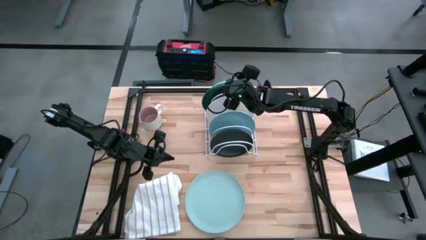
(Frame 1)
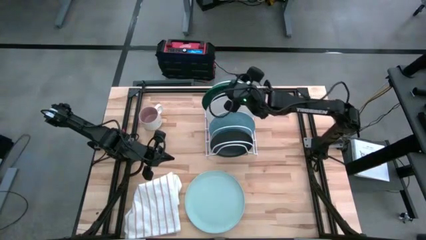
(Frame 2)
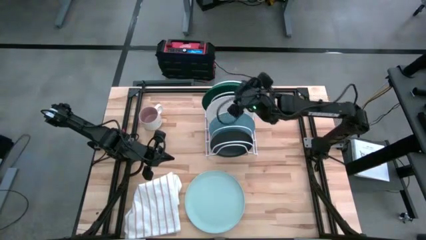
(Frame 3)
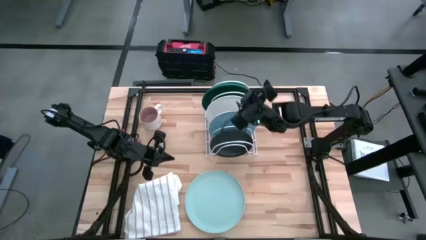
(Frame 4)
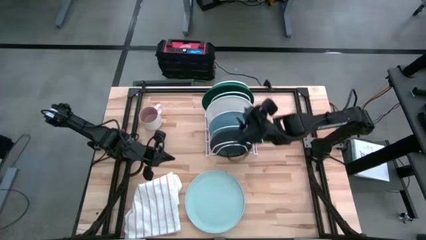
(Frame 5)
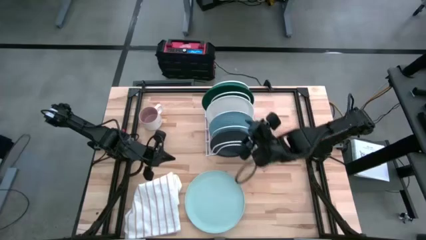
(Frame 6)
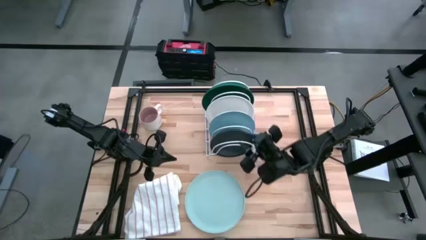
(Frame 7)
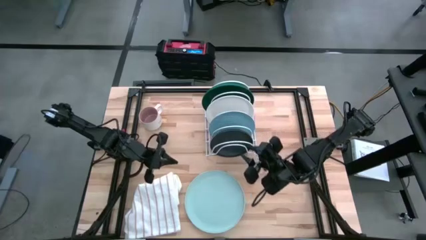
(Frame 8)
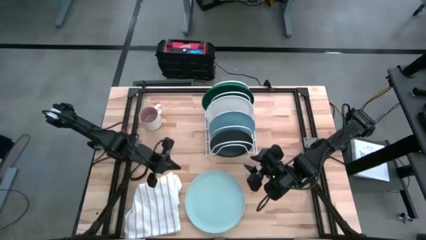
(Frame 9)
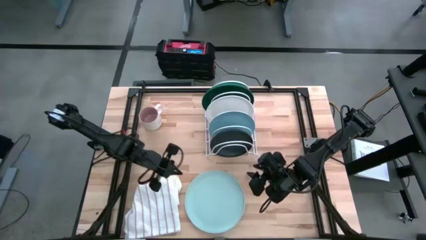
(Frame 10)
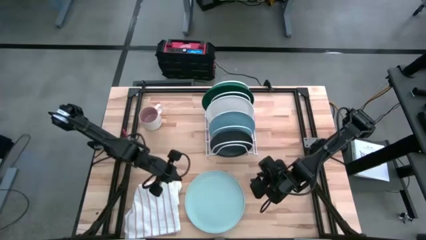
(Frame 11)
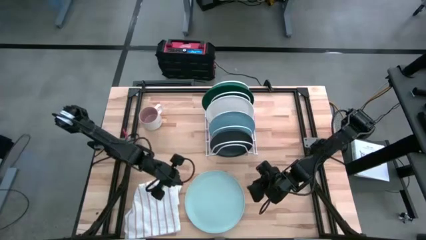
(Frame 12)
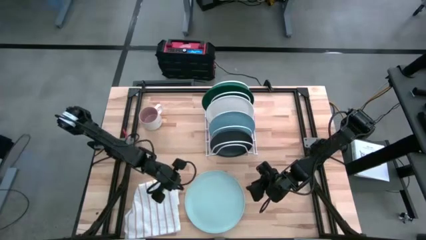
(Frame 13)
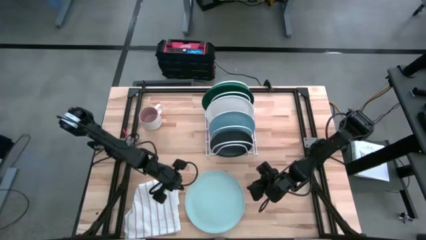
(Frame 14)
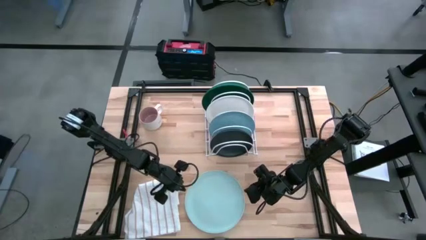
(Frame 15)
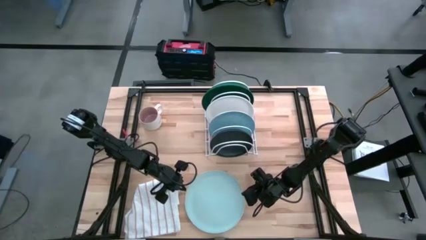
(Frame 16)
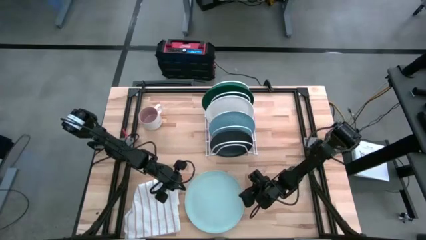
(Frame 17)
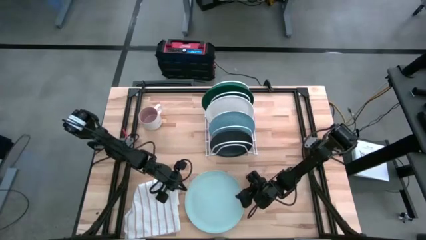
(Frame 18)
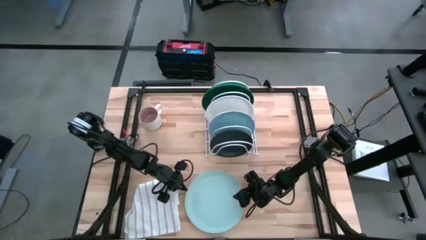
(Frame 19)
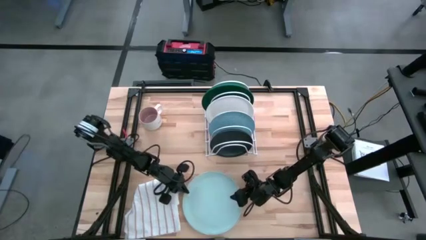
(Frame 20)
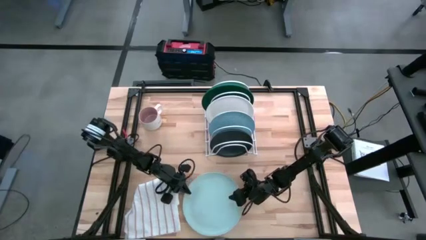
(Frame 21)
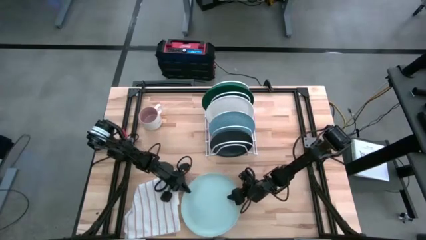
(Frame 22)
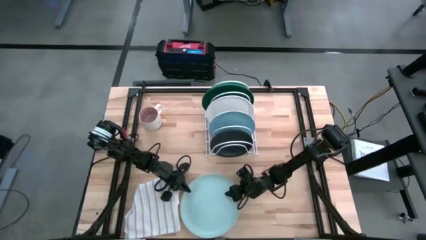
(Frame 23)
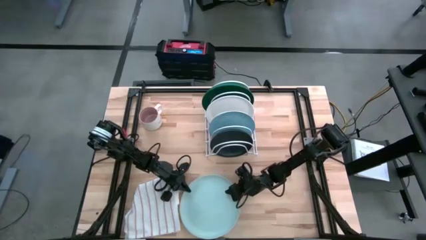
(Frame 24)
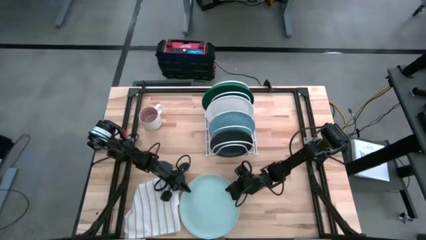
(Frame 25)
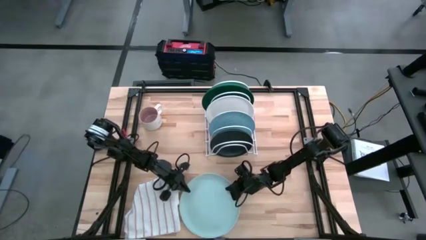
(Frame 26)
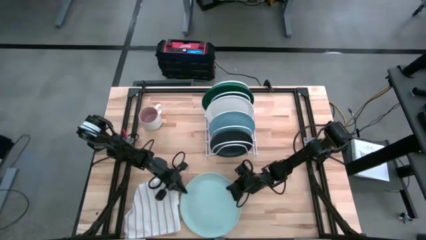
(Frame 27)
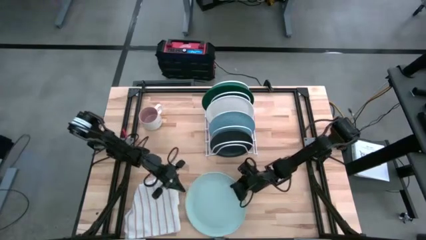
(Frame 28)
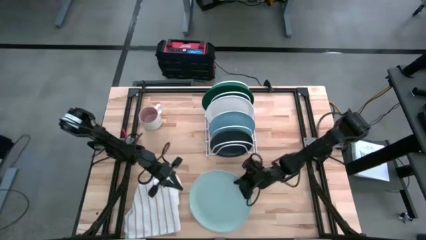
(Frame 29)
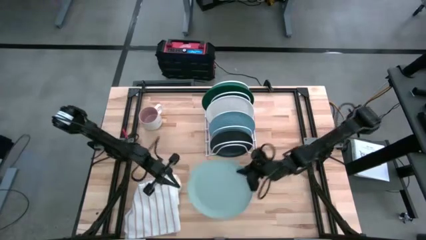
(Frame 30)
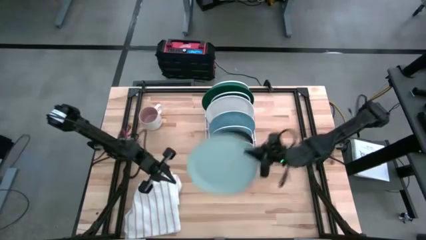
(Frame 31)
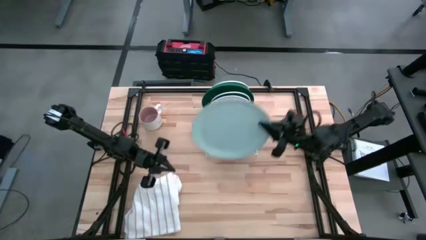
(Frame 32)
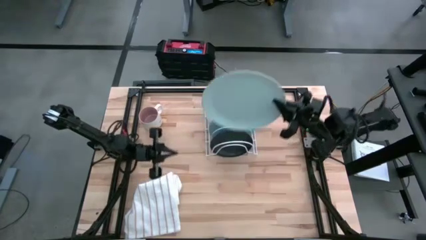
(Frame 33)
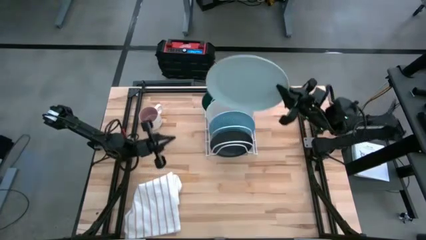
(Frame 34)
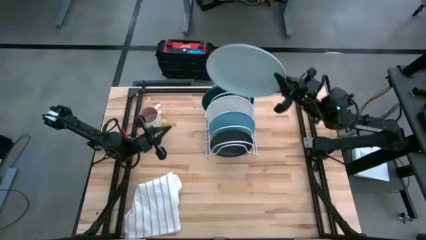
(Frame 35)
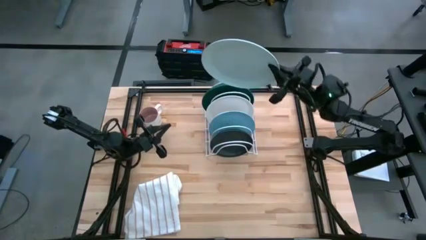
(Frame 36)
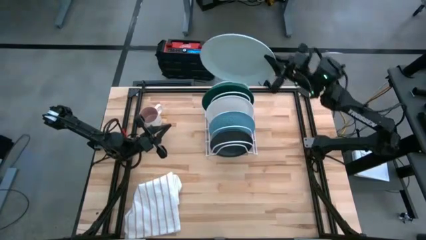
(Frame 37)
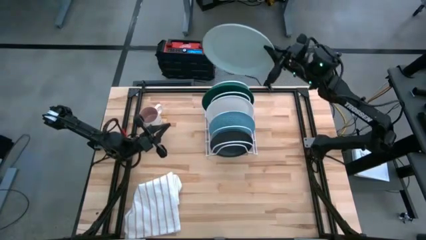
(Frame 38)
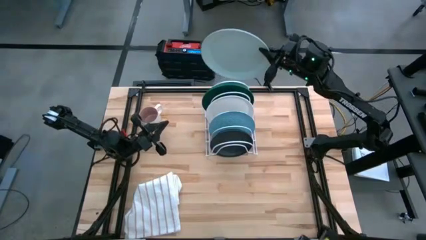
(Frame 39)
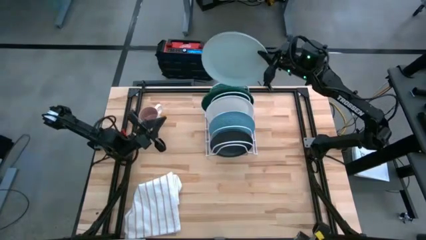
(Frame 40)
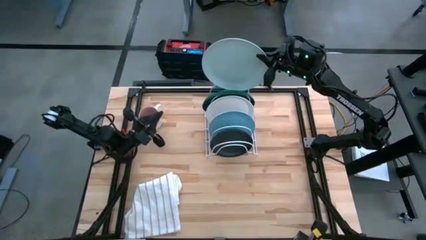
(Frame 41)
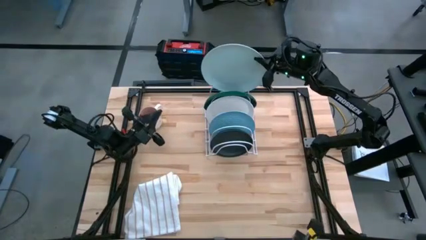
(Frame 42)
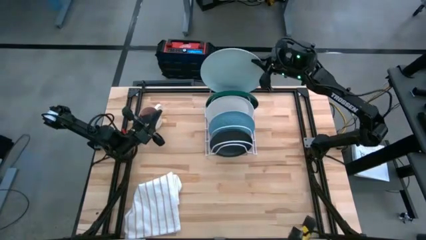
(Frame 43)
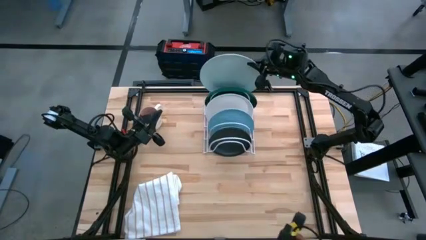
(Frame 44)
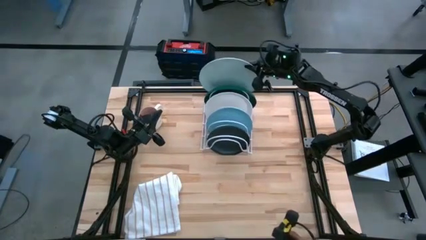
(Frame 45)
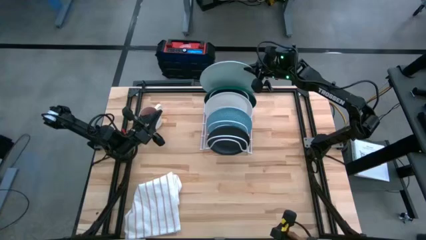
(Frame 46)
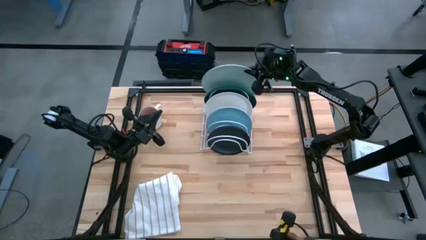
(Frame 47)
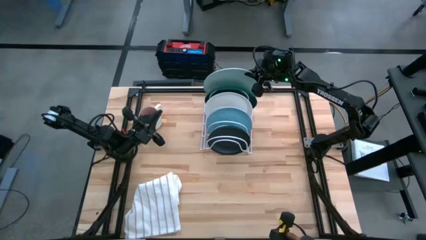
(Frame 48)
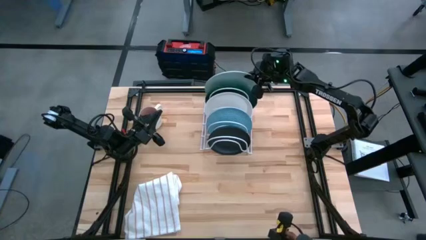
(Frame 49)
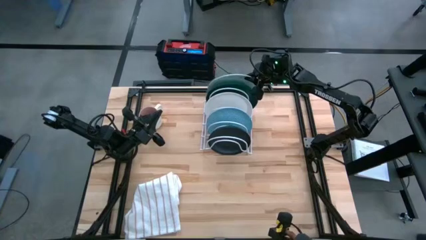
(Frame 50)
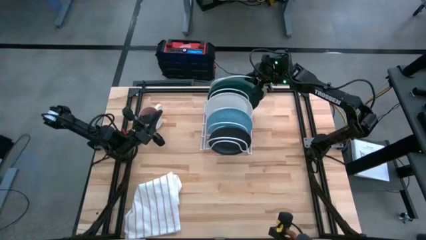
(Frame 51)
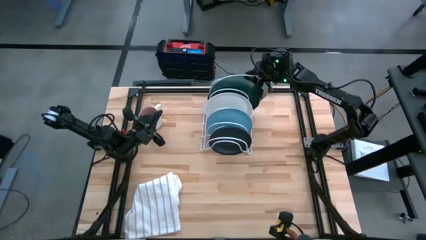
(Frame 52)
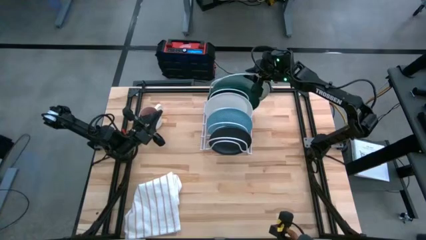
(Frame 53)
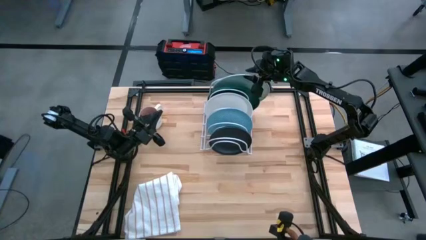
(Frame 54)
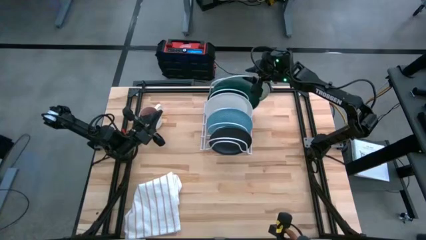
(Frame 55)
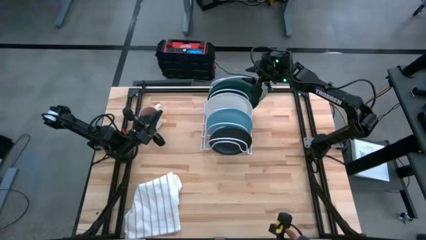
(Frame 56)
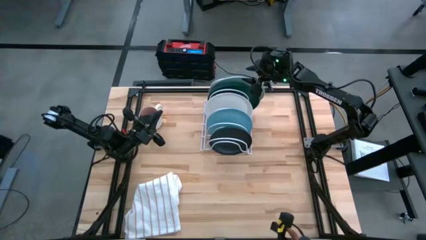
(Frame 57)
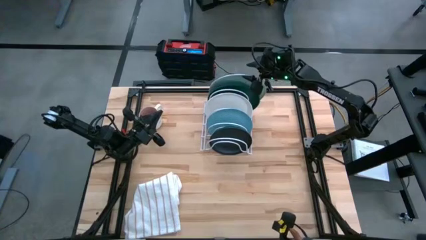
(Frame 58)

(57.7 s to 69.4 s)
Task: Sort dishes
Put the white plate into the dish rack

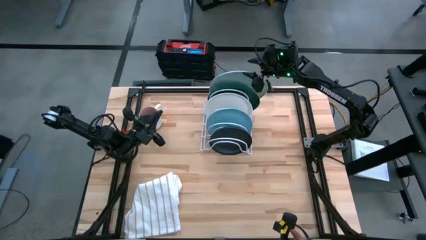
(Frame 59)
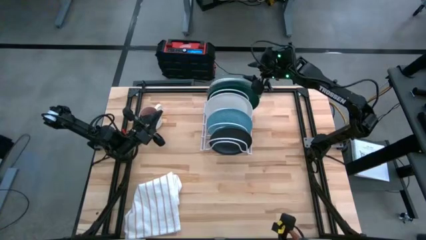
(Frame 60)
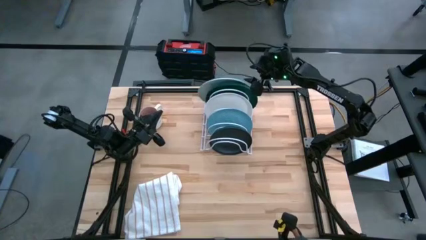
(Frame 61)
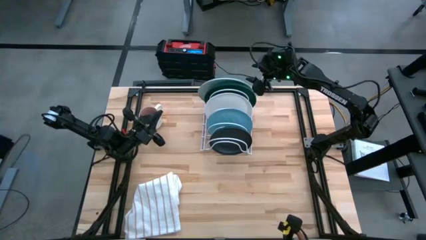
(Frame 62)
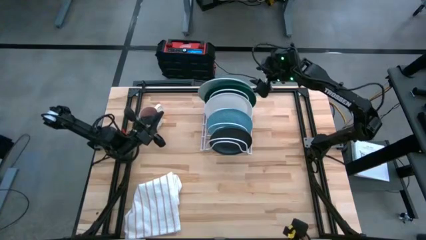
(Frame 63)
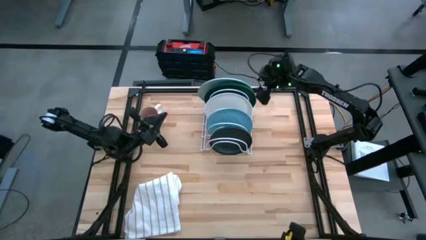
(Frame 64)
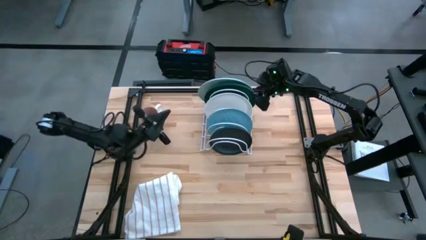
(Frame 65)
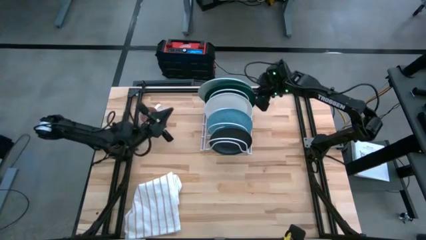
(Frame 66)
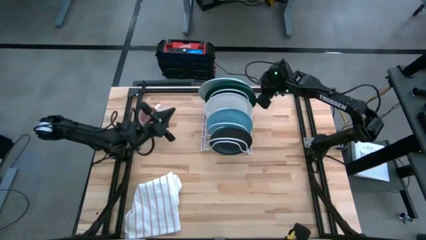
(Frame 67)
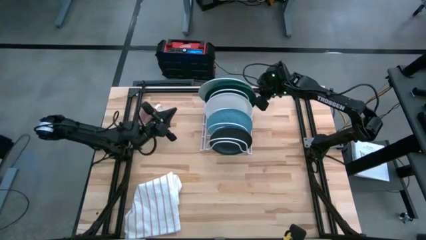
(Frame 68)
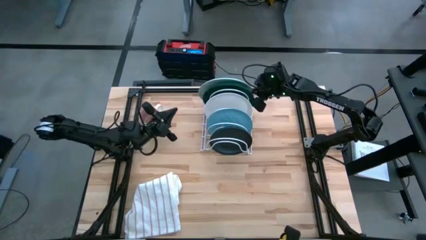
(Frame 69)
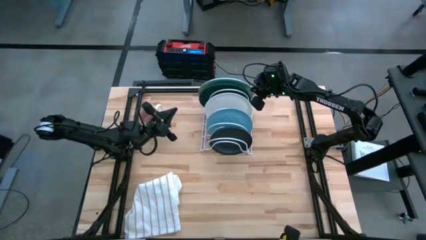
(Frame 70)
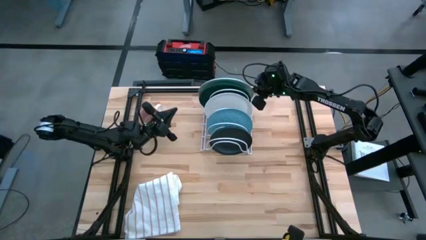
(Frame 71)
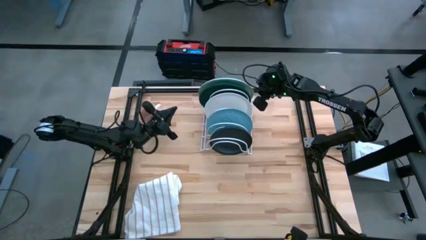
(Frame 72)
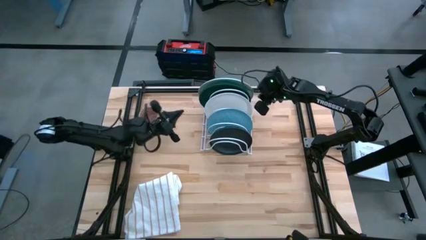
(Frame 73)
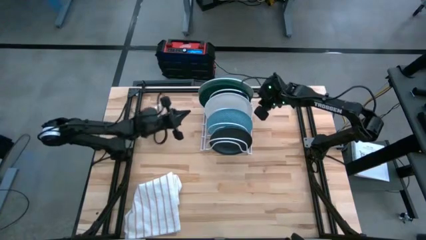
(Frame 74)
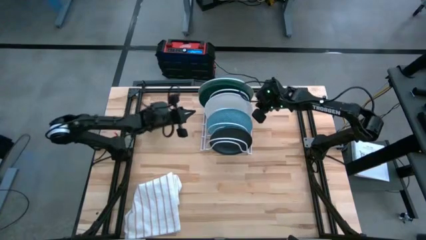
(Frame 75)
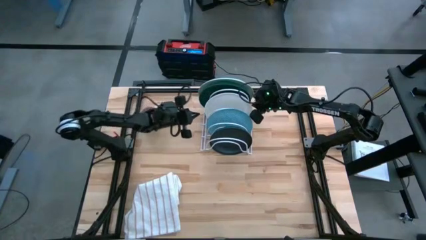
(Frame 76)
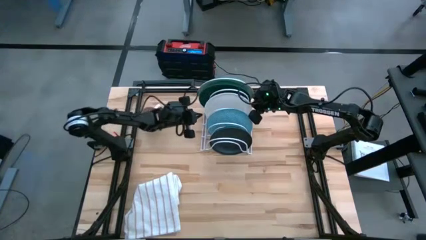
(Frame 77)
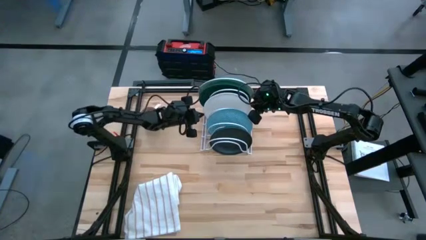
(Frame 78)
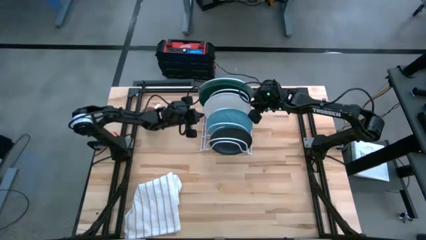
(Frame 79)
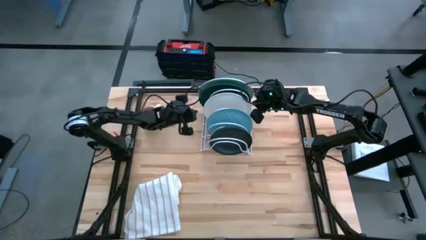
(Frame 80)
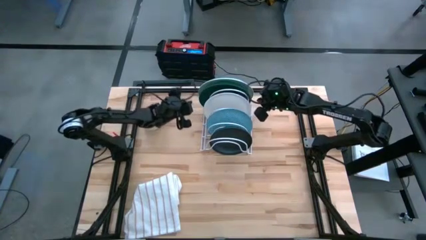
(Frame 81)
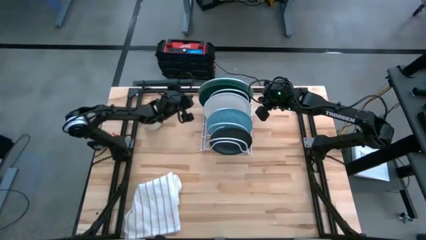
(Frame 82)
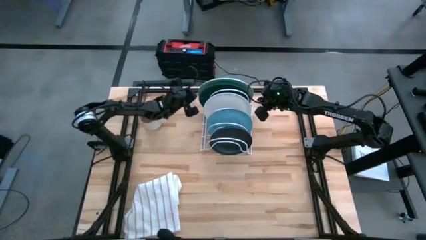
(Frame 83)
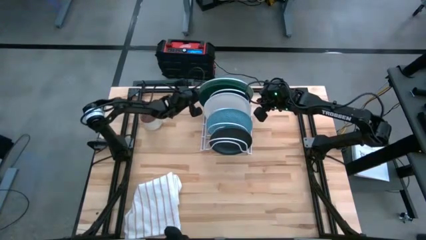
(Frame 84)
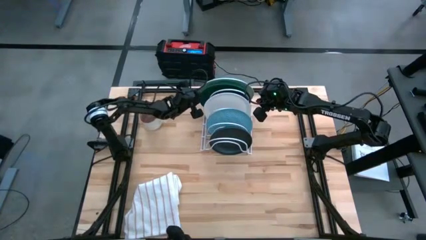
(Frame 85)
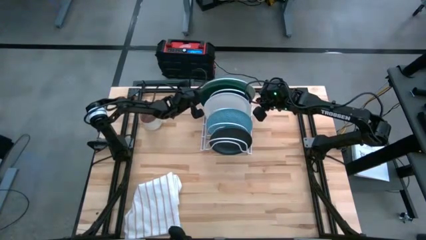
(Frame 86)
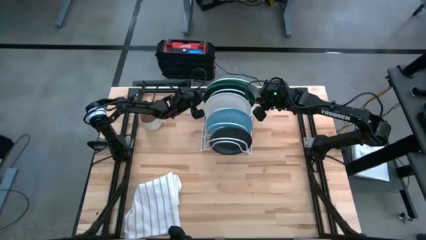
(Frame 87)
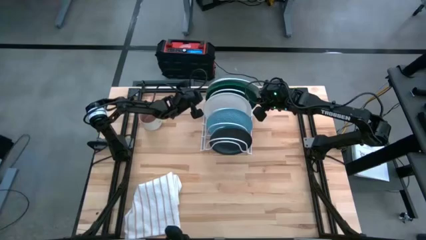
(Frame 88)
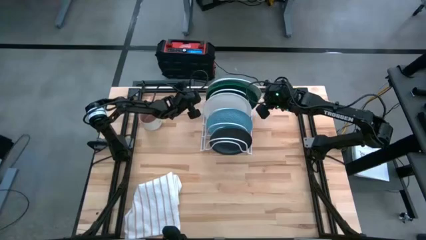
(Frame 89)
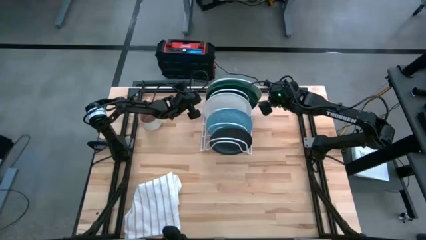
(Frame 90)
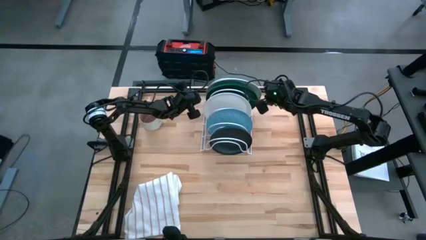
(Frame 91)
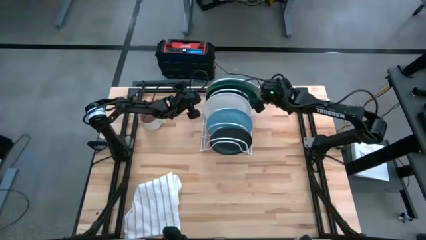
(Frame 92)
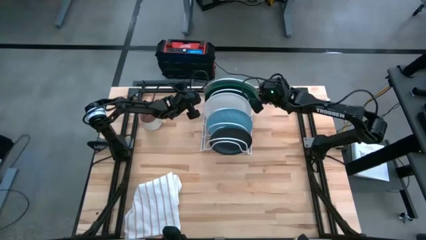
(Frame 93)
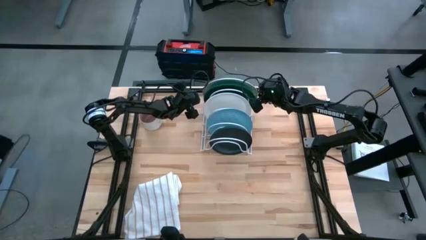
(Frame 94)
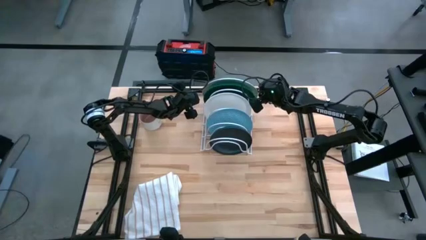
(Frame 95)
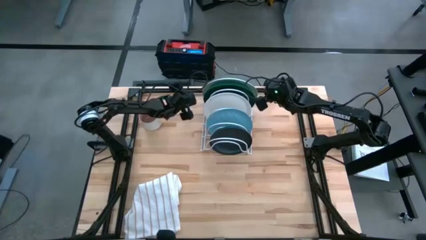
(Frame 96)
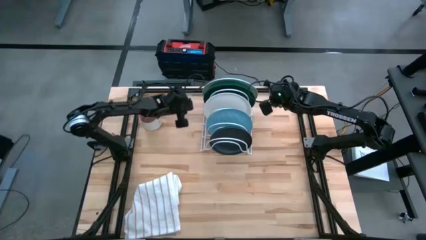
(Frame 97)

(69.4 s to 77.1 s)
Adjust the plates into the dish rack
